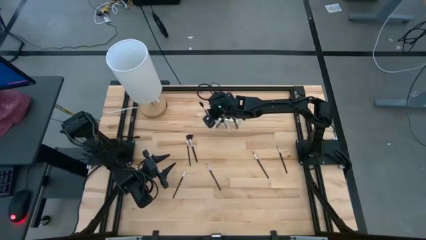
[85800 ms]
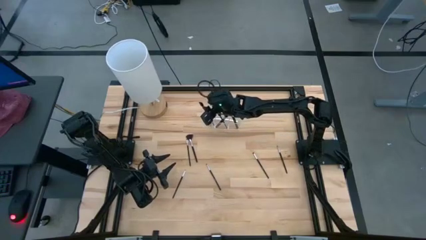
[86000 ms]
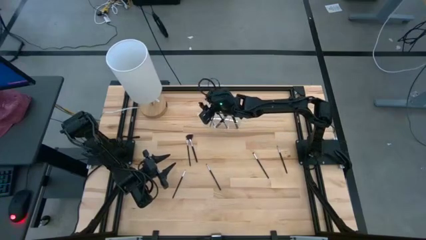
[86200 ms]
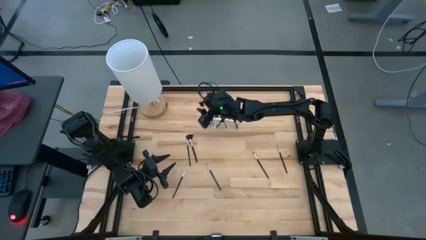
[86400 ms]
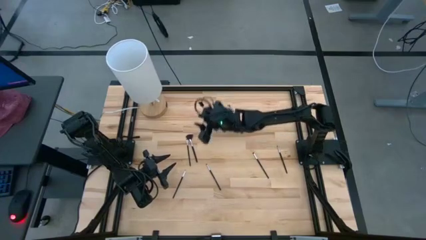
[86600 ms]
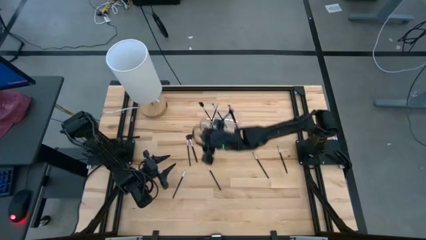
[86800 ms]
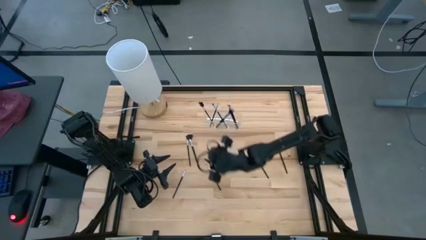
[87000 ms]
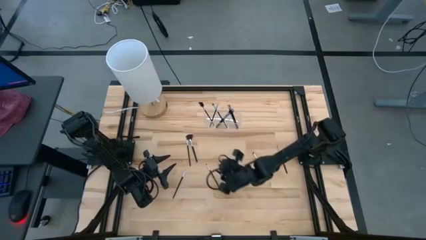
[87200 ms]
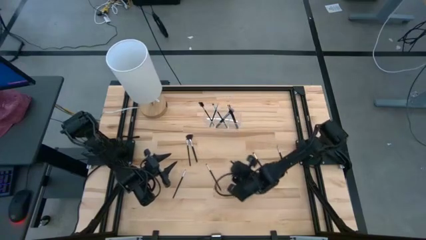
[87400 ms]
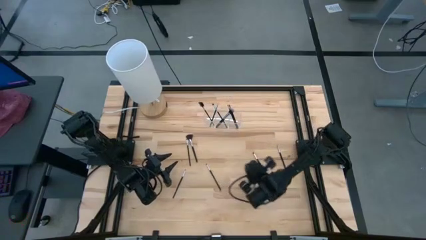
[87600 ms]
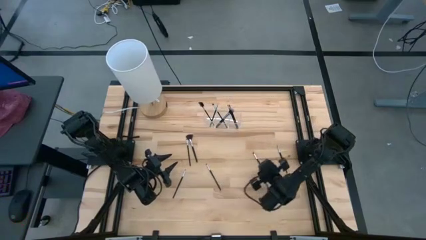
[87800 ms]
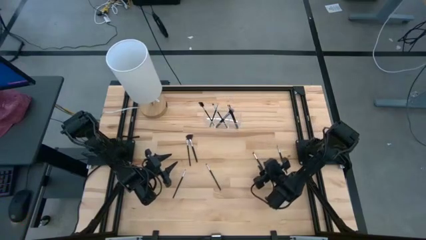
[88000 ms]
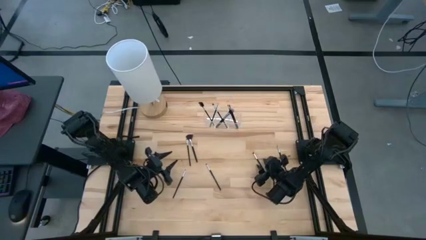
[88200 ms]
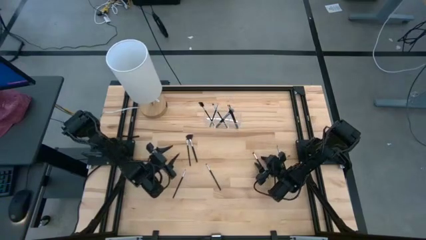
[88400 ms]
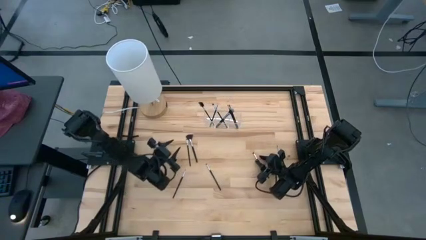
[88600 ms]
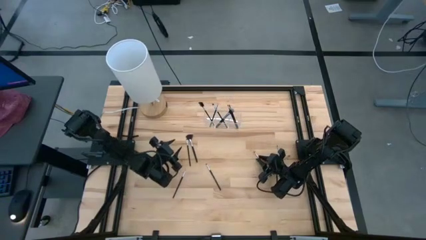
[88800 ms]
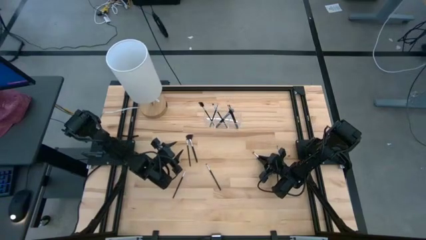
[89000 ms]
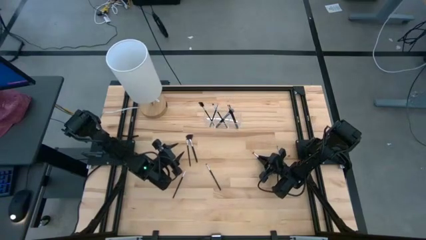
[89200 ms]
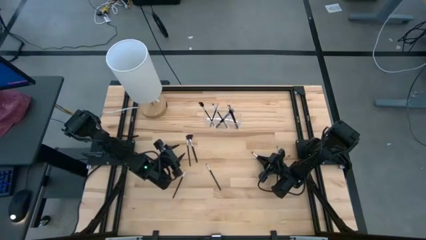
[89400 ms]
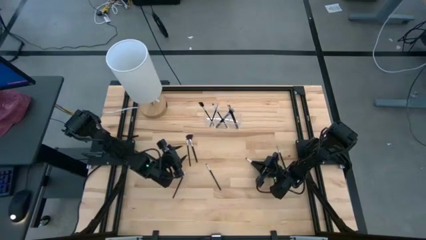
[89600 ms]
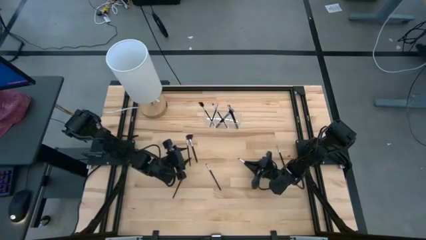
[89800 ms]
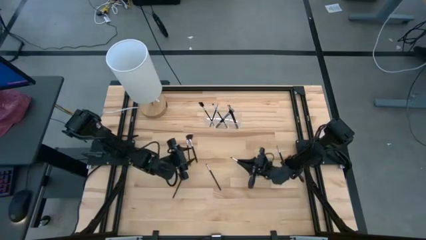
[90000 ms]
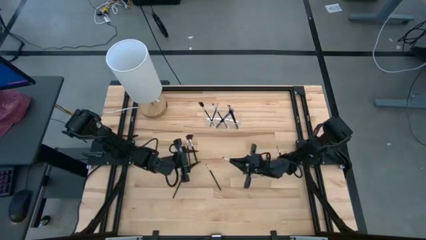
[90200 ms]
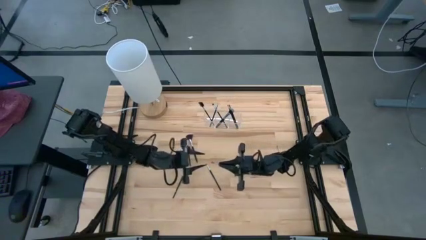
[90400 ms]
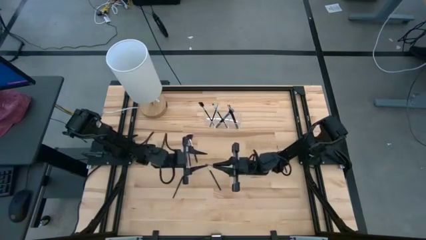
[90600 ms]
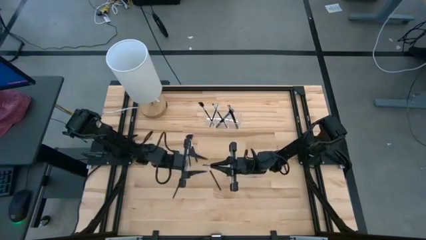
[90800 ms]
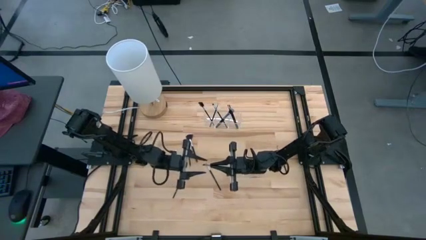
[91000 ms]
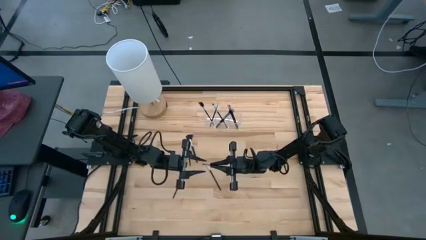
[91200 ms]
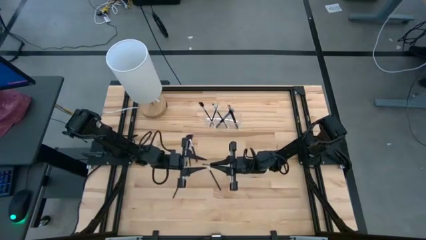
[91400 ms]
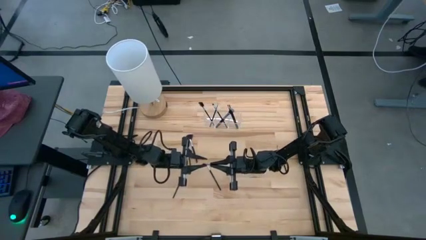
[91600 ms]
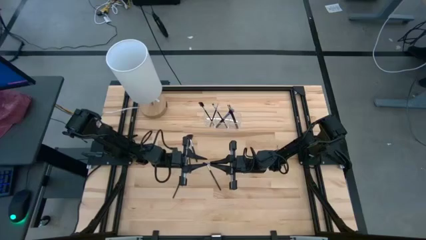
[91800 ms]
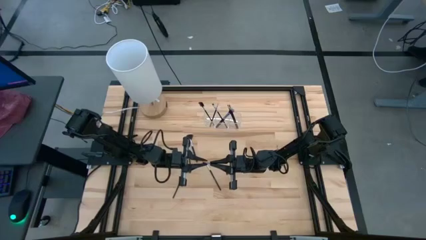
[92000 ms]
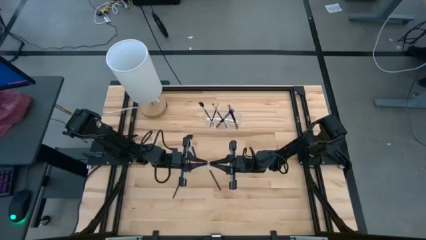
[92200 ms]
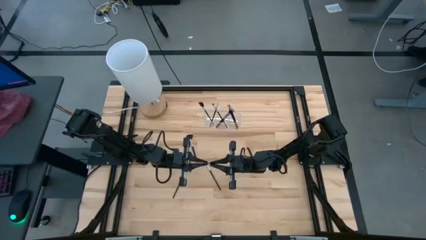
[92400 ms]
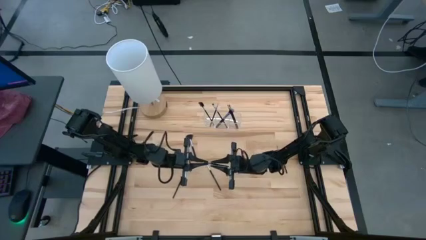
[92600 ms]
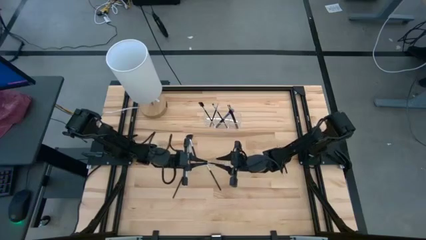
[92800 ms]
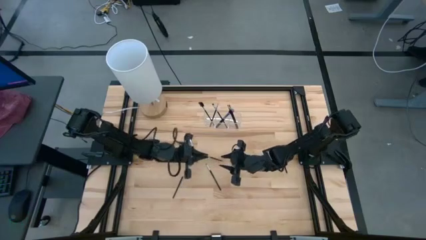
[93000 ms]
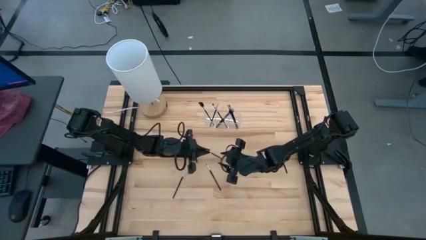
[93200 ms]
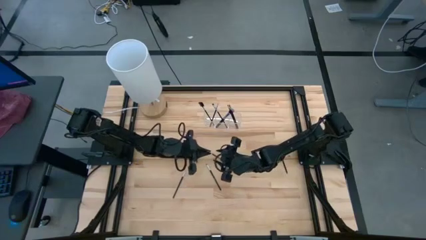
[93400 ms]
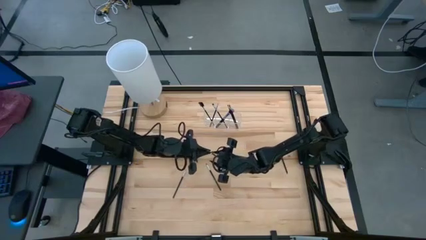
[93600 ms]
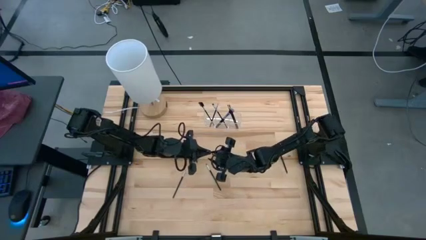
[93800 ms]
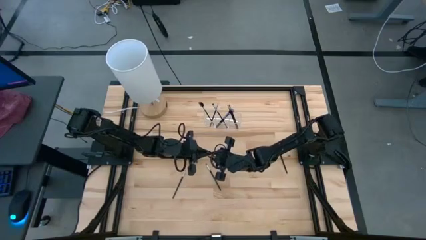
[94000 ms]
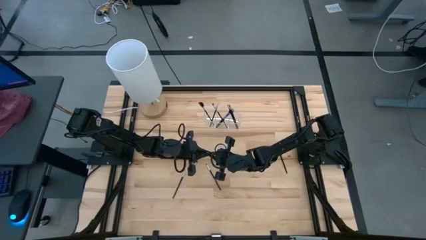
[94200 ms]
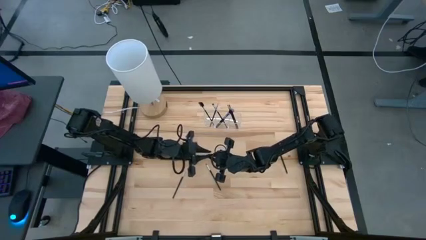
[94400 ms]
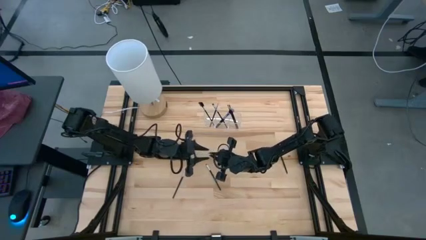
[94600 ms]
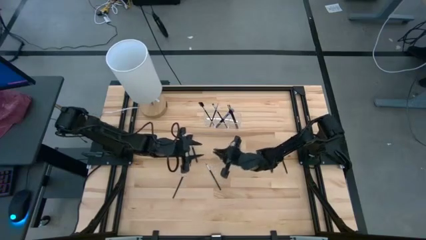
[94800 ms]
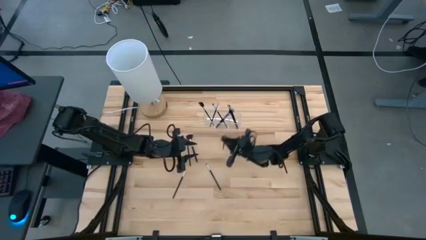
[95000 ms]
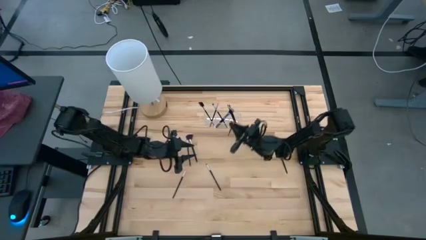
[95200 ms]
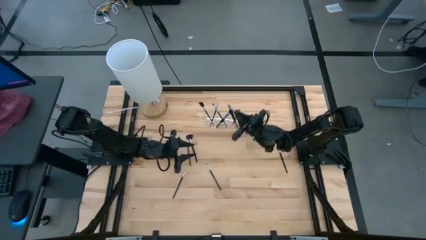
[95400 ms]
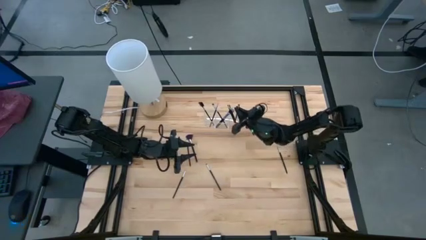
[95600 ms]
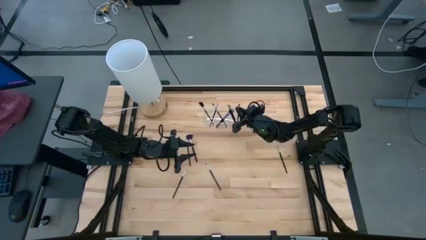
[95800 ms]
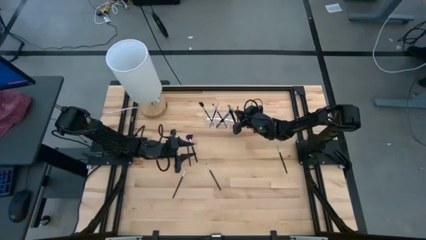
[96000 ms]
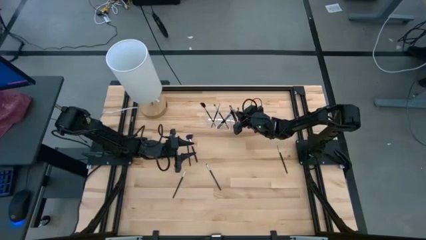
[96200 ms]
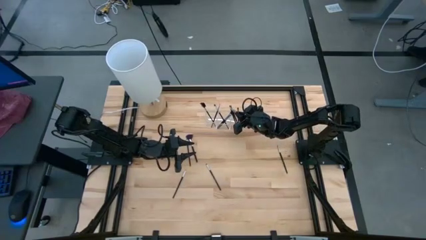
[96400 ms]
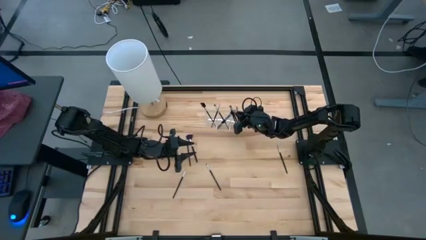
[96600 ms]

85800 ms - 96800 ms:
Task: Put items in baskets/containers
Put the black eyeshadow brush into the transparent organizer

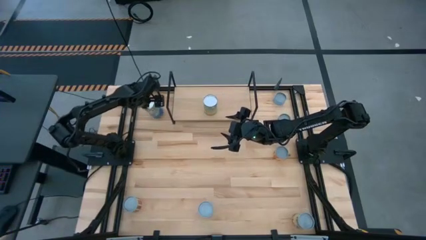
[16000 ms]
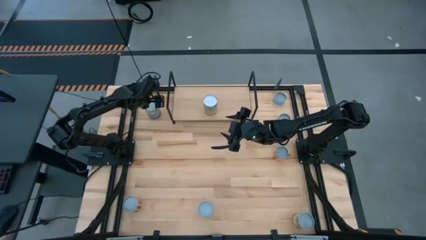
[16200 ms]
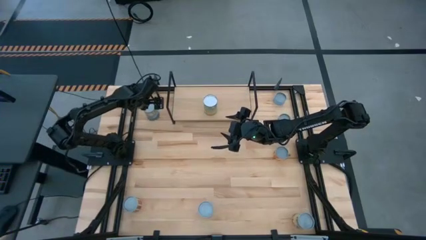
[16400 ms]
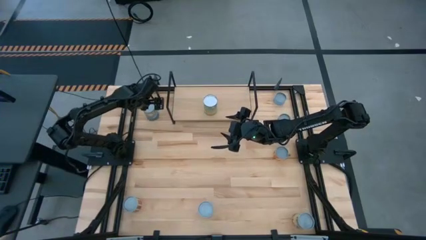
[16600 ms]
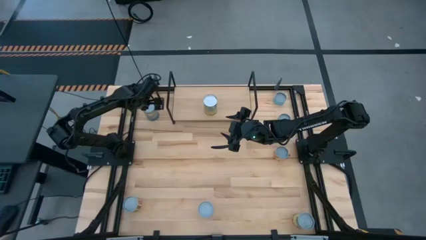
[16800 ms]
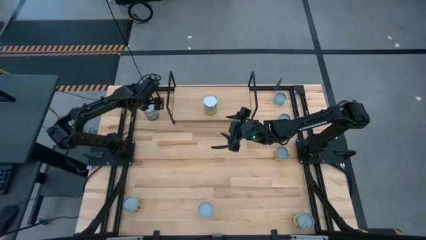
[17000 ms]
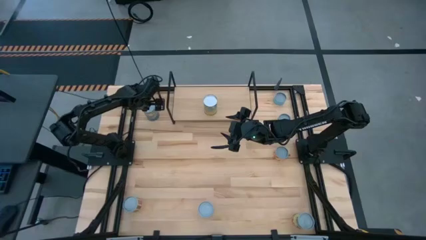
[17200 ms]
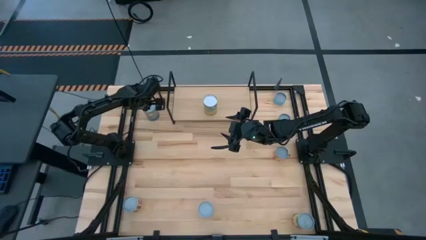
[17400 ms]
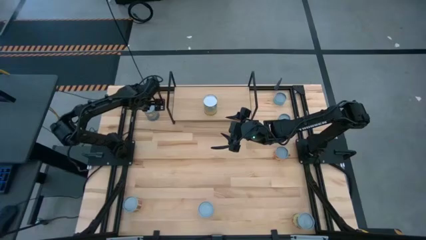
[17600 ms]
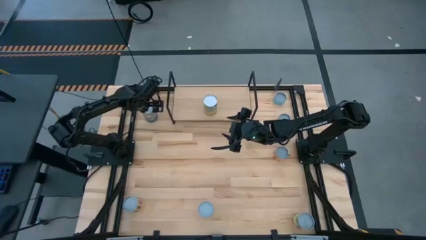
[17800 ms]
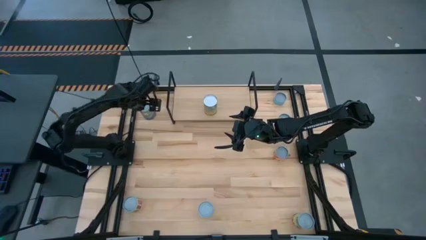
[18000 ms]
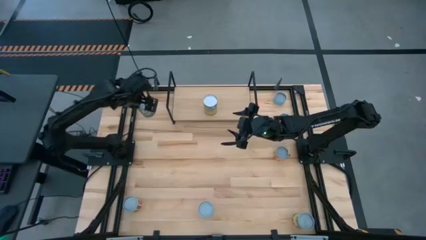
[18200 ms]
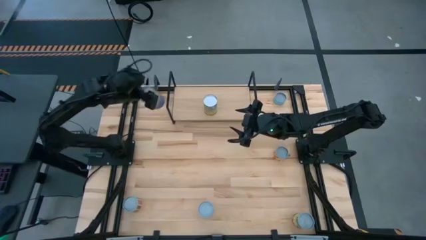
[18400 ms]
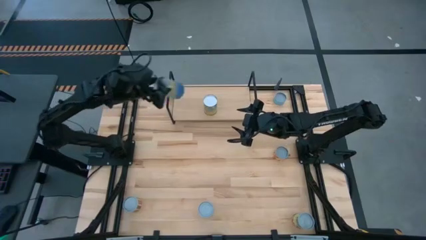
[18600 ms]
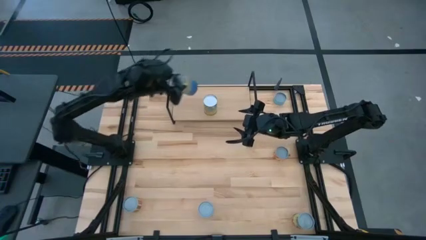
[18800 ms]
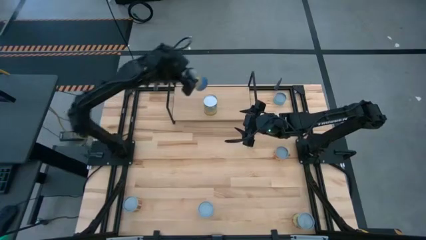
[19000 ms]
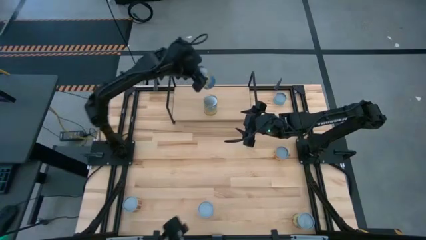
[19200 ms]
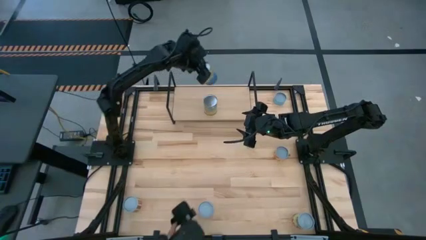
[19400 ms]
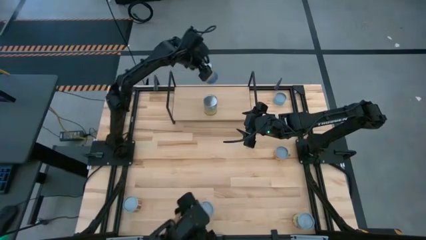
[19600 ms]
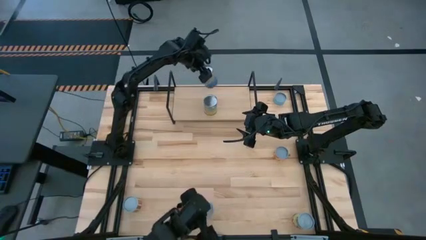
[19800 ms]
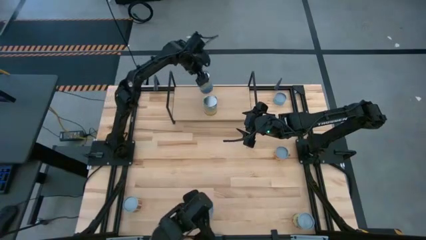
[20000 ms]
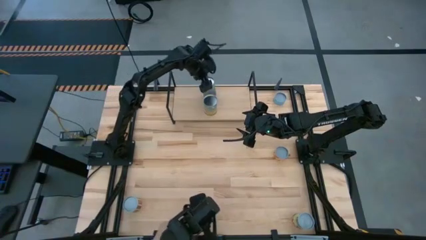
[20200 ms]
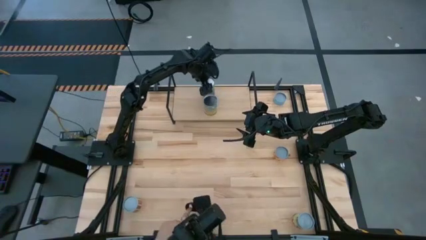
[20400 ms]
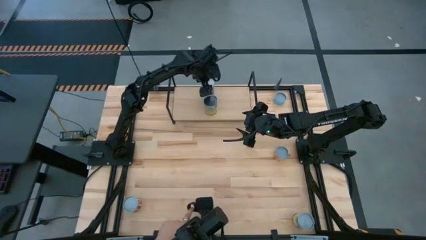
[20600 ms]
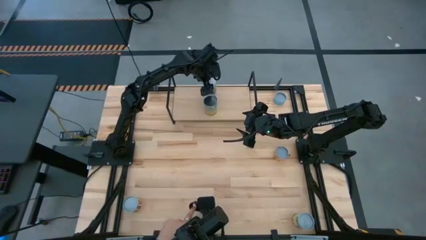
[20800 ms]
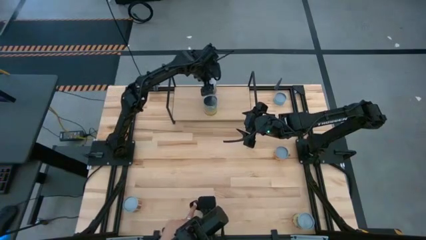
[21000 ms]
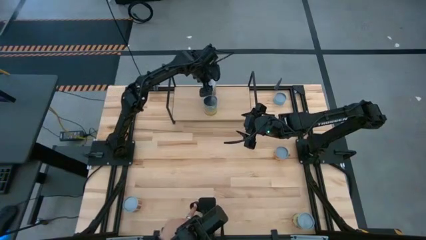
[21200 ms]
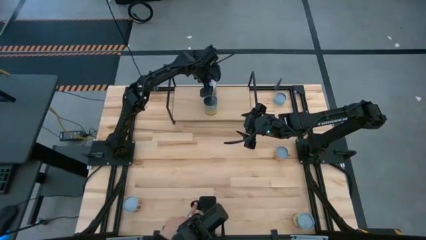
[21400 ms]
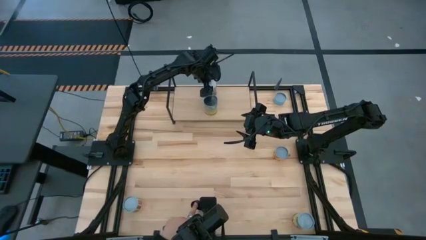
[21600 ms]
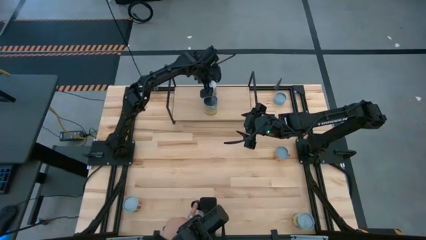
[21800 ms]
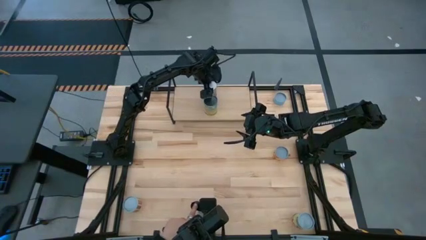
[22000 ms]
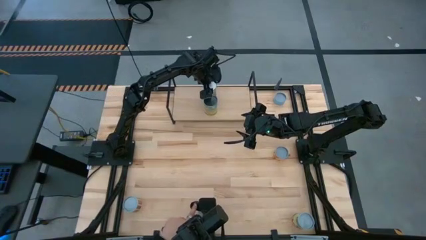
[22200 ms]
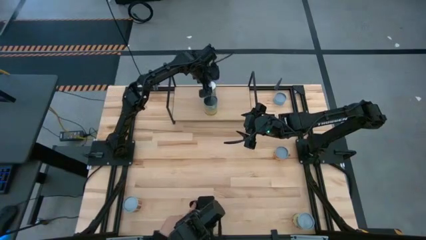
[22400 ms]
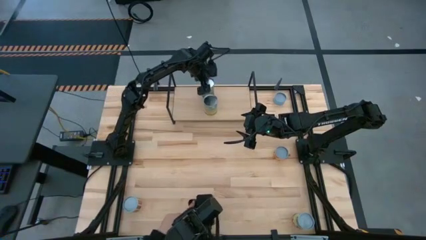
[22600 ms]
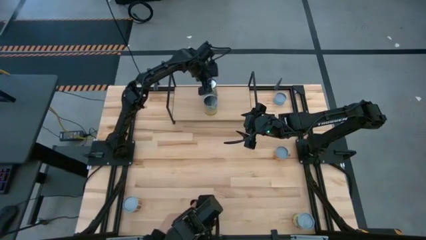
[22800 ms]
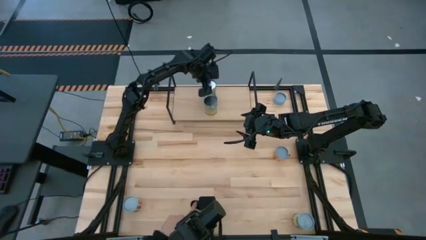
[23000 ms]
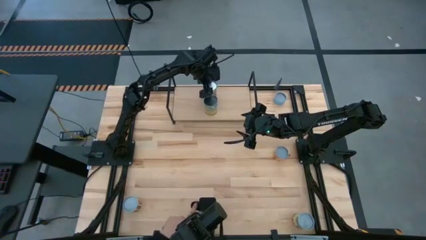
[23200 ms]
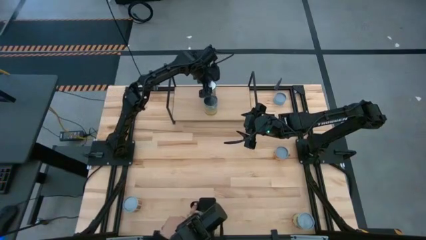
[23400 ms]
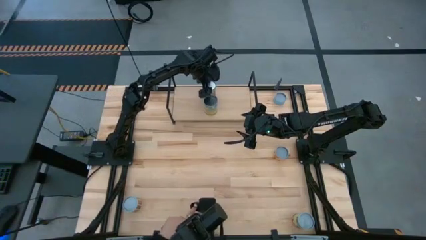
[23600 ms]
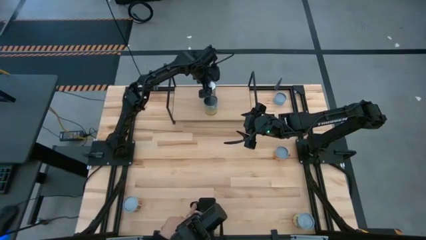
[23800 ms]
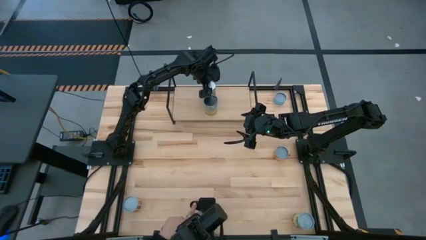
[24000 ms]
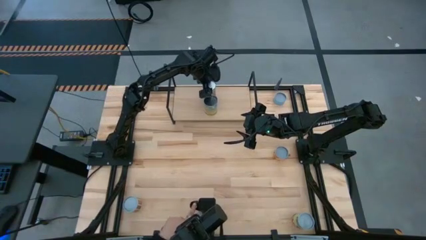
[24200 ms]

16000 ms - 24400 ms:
Task: Pick and place cans onto a shelf
Put the canned carrots on the shelf
